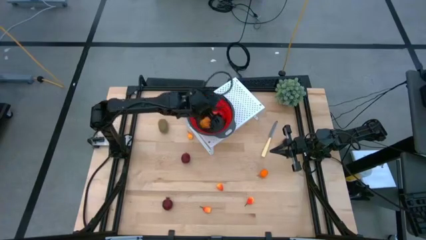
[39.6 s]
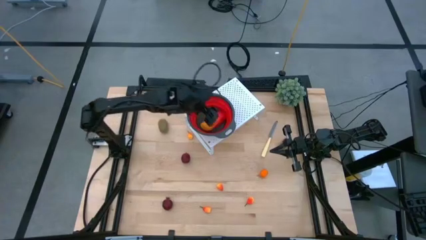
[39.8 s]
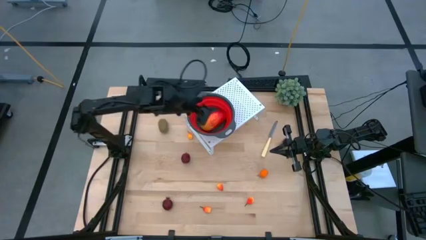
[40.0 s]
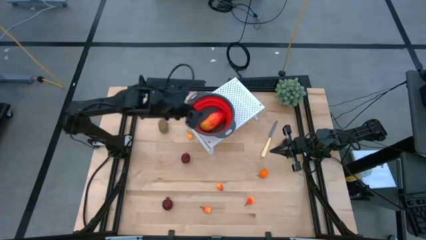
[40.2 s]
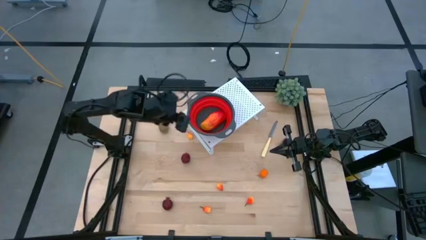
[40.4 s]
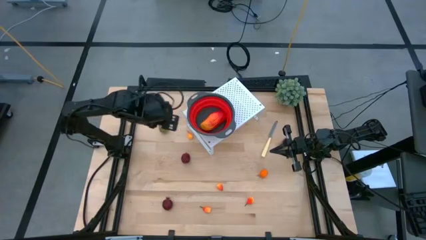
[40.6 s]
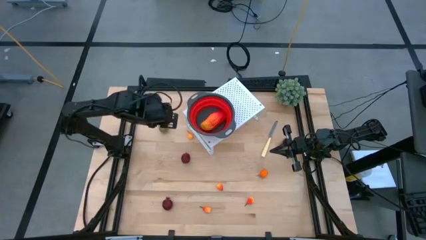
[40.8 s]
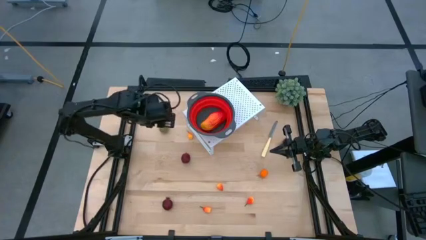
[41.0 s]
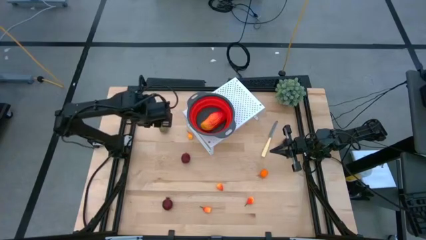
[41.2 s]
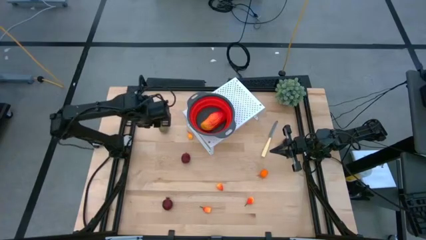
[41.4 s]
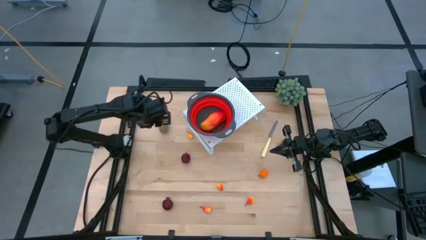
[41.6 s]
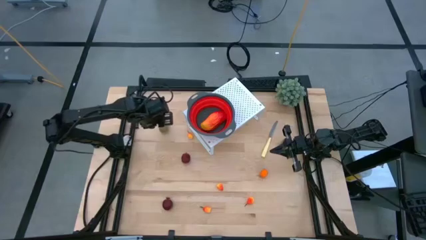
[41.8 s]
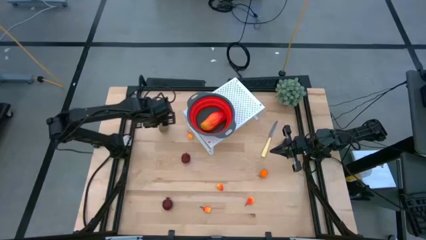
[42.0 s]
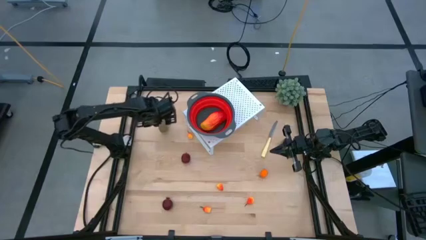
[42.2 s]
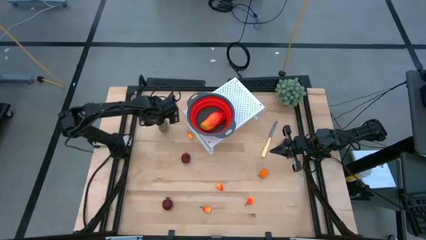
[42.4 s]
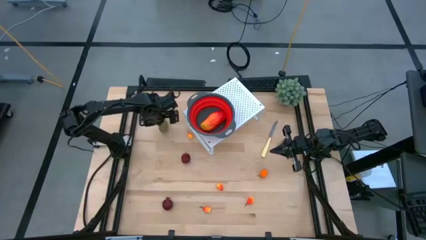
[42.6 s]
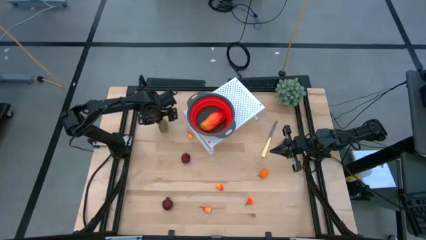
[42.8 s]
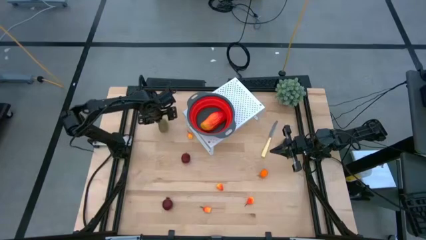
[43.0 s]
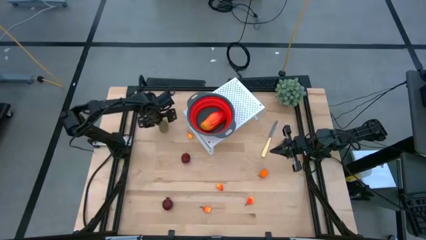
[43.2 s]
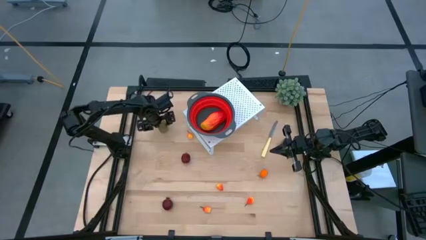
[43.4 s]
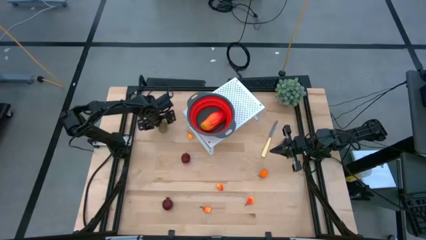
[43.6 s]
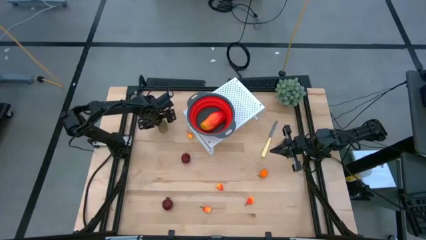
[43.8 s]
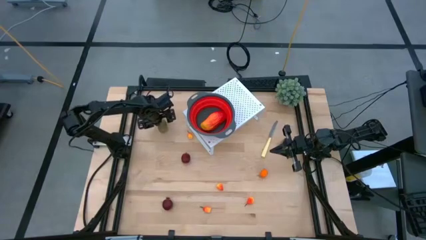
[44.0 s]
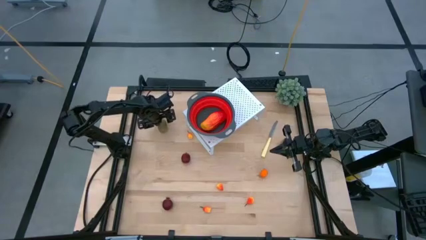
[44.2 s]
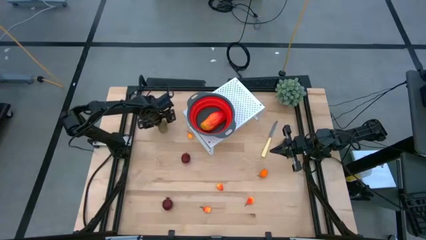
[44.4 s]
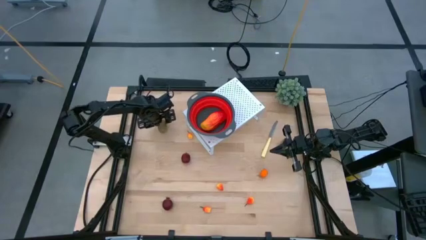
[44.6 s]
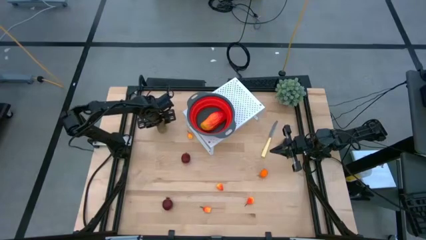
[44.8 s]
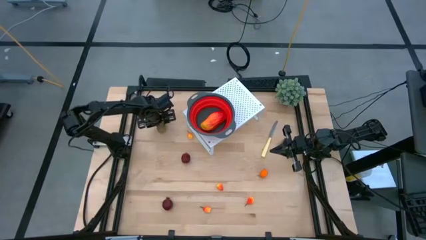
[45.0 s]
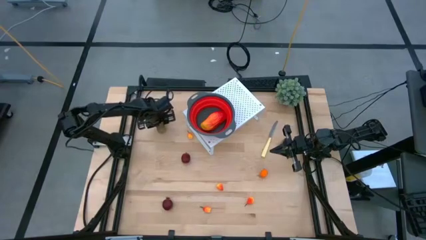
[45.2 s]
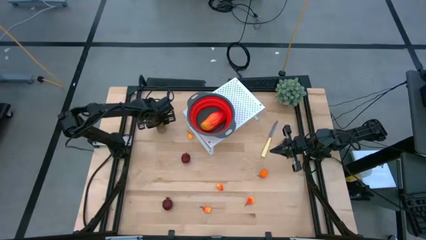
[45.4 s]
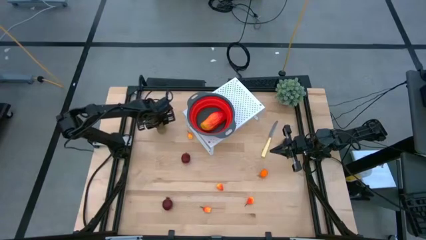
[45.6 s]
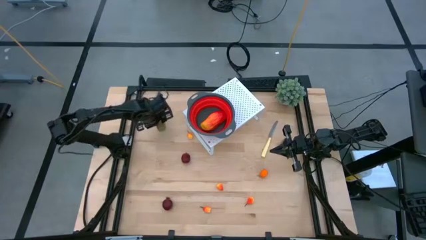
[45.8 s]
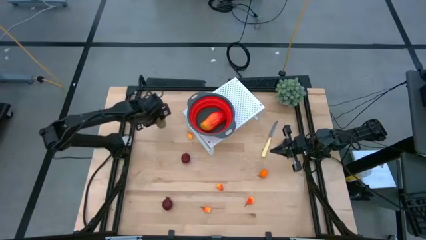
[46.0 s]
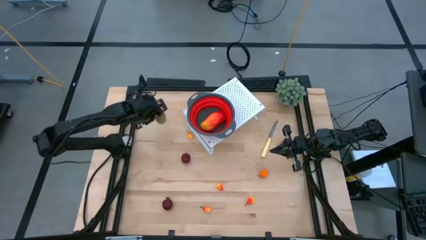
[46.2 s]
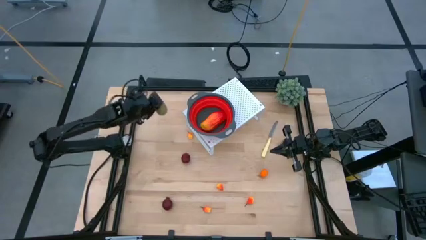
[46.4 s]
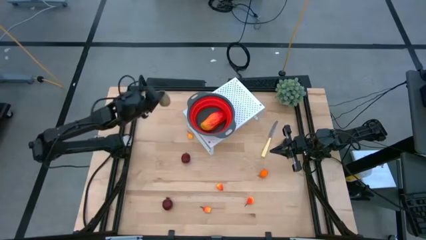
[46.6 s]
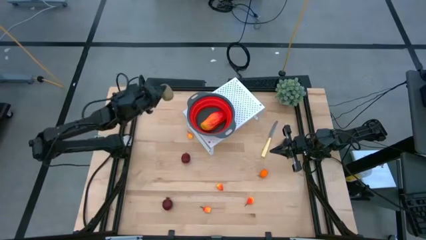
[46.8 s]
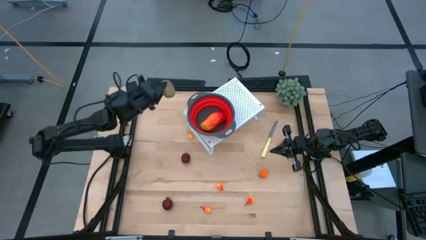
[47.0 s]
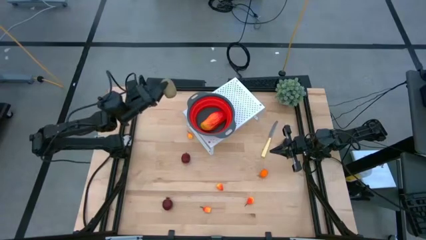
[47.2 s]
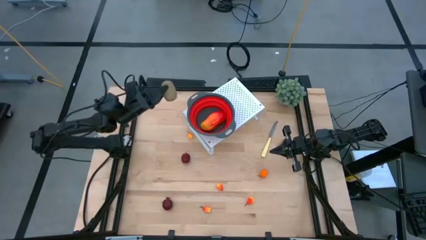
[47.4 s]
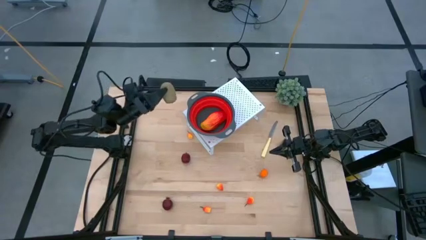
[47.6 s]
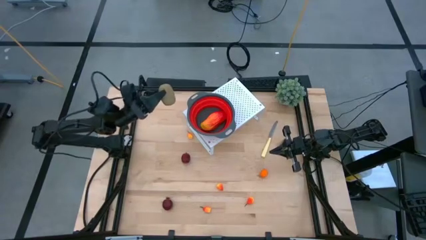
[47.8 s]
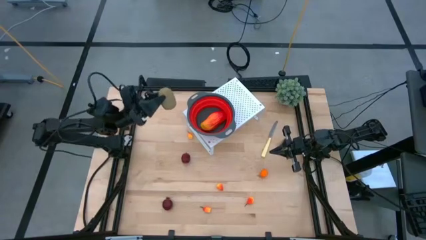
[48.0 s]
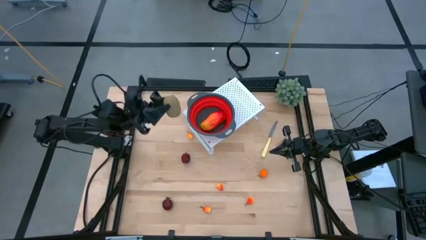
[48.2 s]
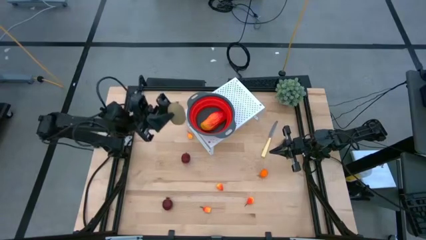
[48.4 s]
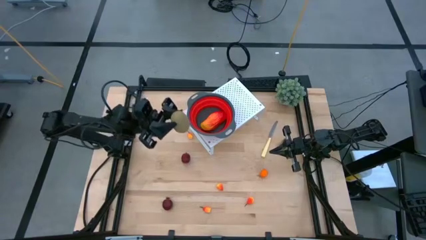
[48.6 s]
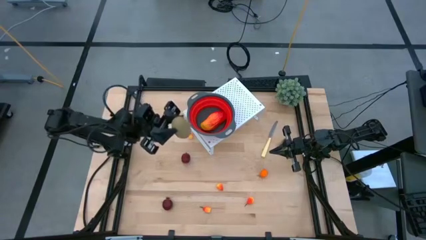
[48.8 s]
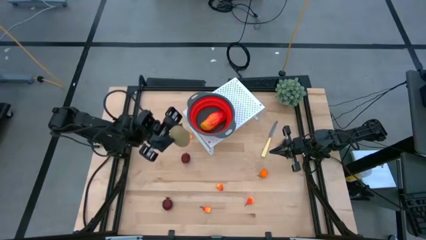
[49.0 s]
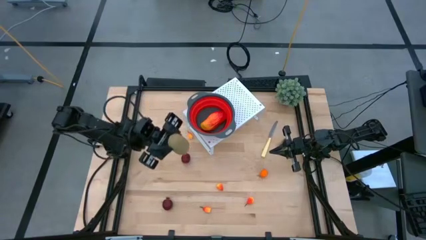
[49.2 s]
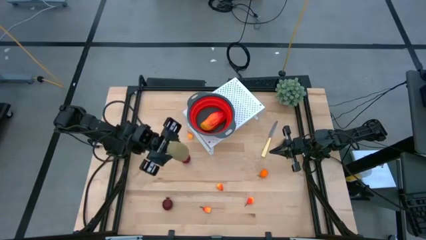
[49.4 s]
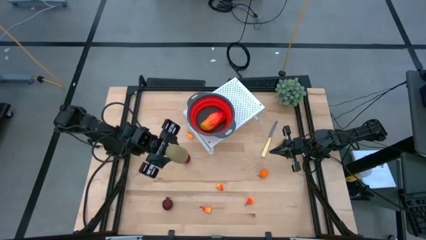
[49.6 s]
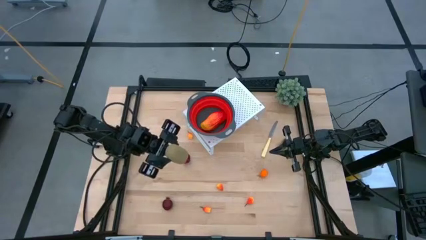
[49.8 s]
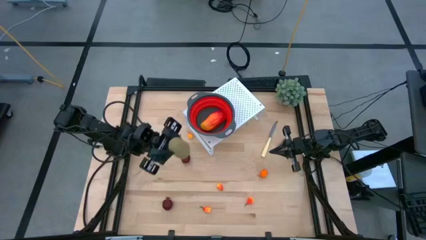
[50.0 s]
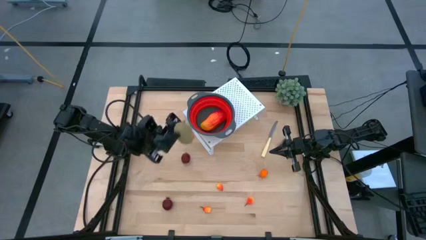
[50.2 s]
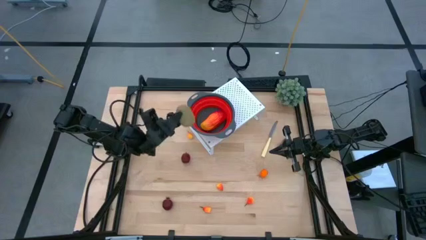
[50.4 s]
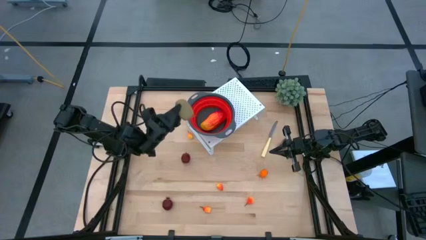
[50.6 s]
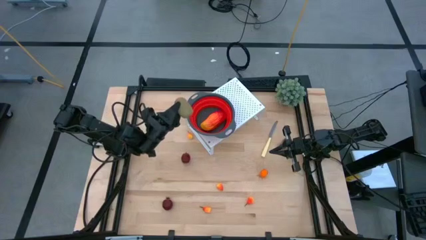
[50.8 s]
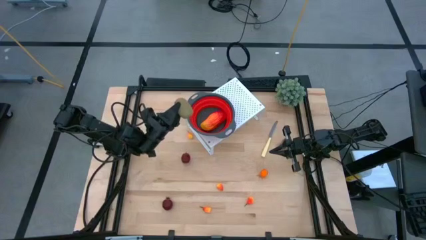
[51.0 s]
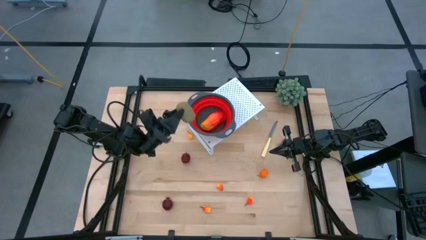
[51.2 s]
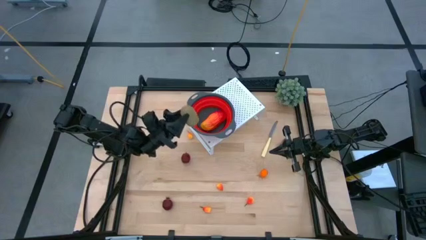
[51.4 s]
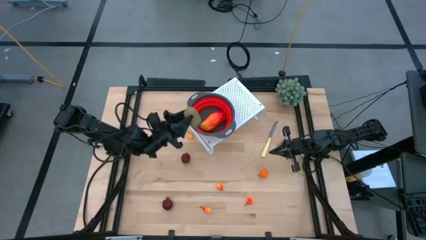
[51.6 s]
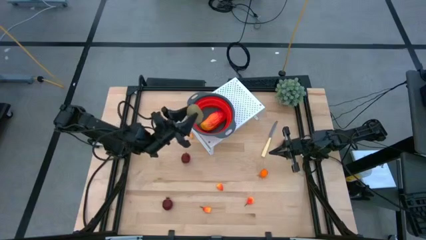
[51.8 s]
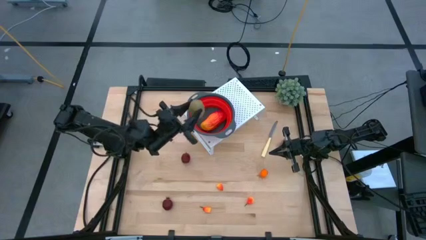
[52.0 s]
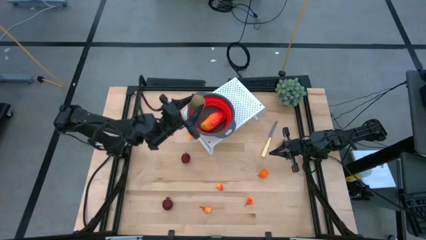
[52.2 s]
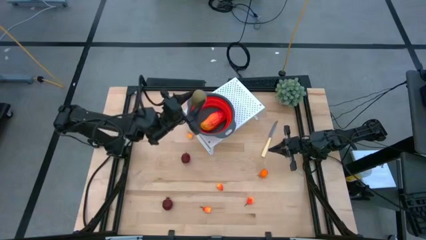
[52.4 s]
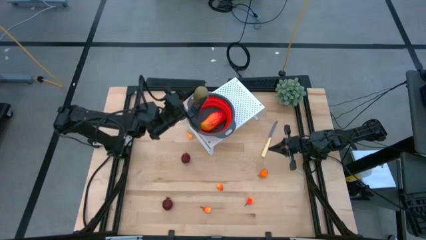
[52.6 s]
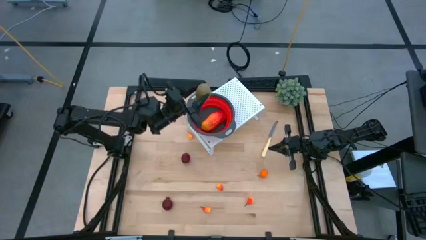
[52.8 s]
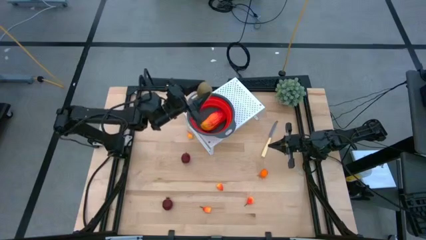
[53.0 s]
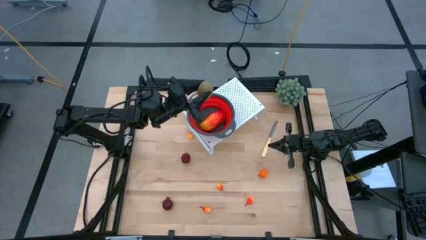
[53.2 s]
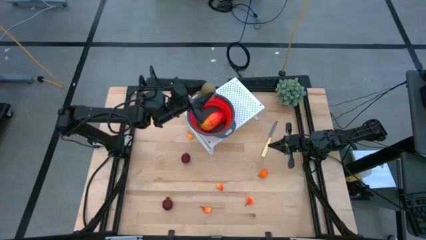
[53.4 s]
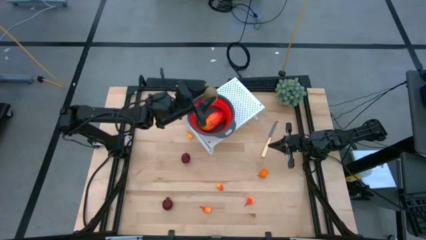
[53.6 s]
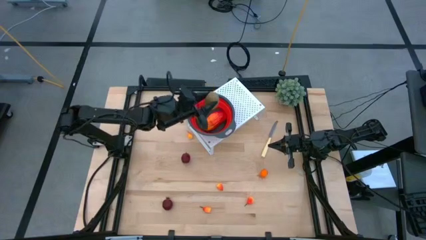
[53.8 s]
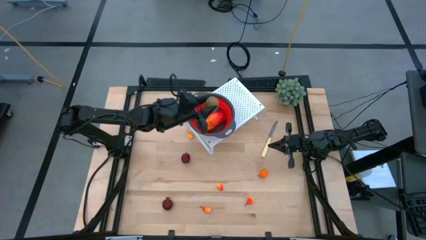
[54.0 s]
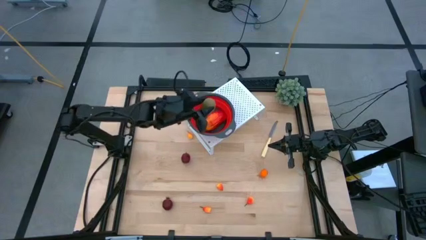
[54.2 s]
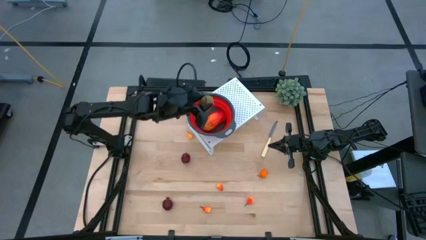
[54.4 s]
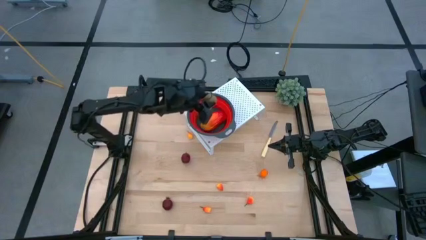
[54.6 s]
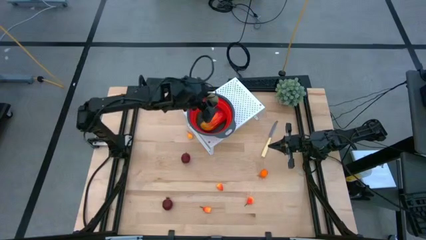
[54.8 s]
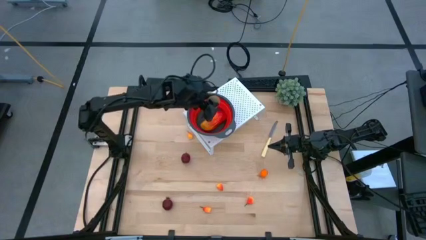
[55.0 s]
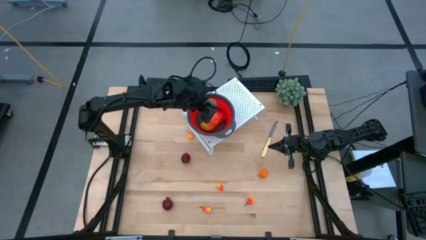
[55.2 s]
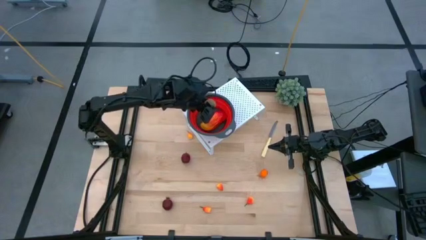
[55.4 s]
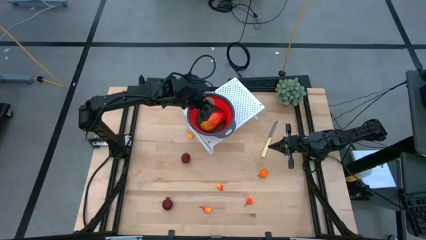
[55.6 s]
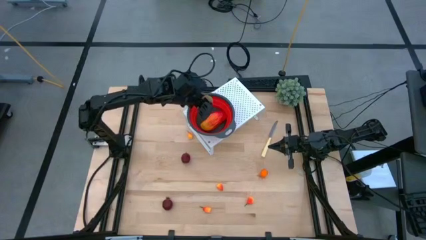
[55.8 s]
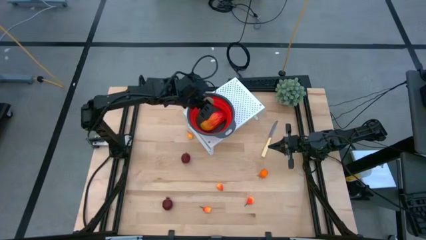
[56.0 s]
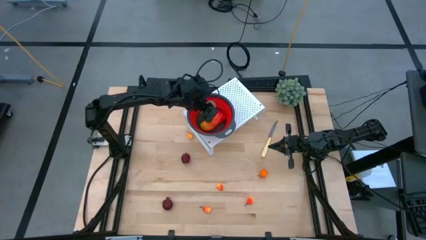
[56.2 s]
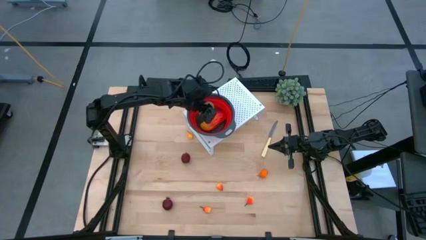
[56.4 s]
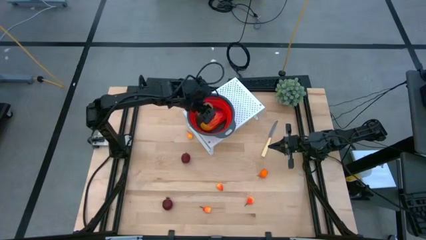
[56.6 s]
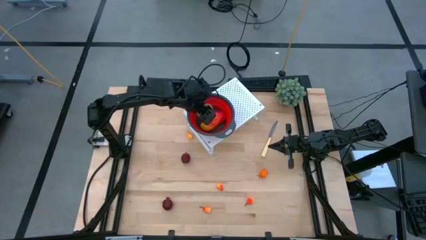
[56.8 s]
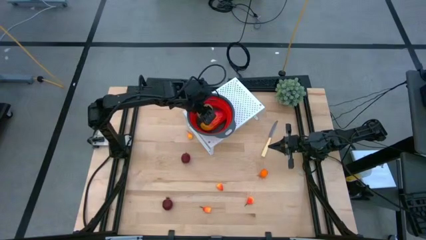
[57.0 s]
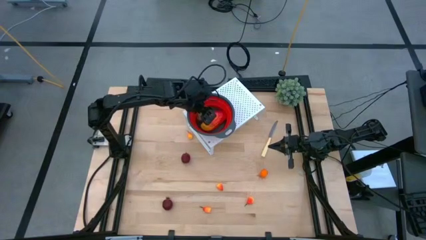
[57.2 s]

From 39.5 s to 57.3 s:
Task: Pick & Place Fruit
Put the kiwi into the red strainer bowl on the shelf
